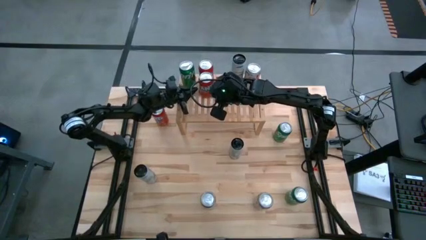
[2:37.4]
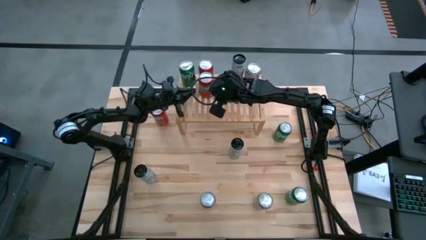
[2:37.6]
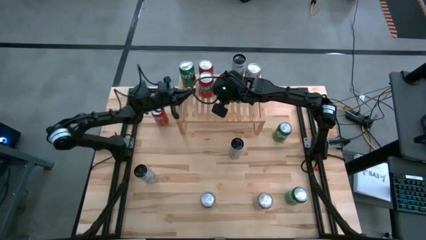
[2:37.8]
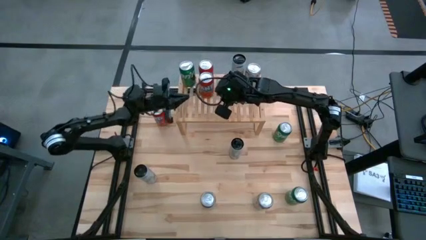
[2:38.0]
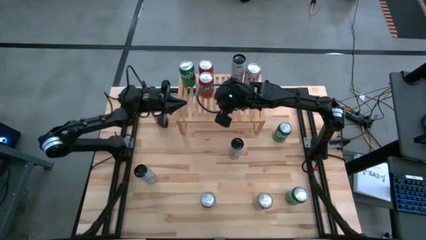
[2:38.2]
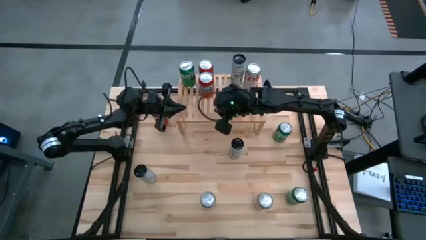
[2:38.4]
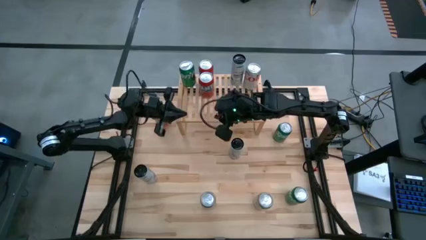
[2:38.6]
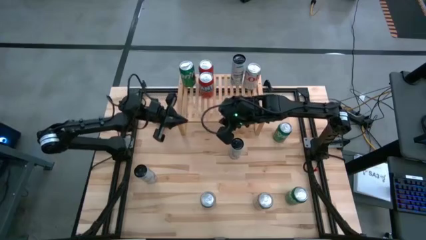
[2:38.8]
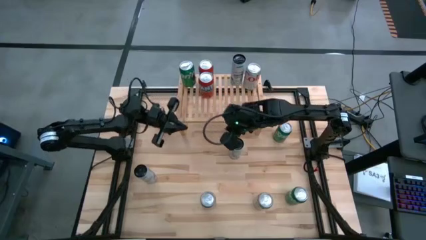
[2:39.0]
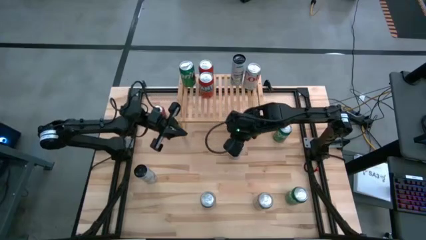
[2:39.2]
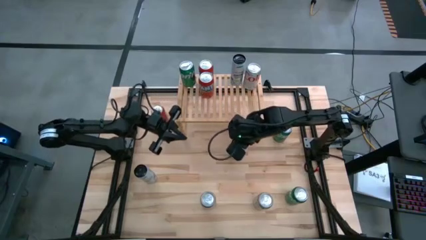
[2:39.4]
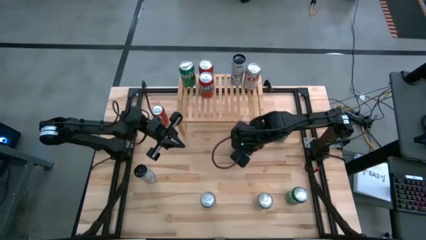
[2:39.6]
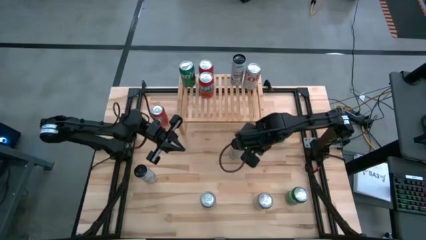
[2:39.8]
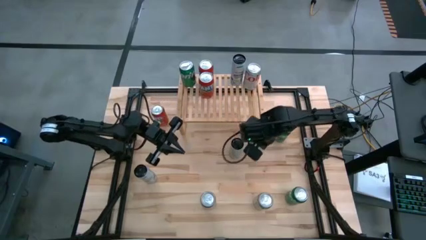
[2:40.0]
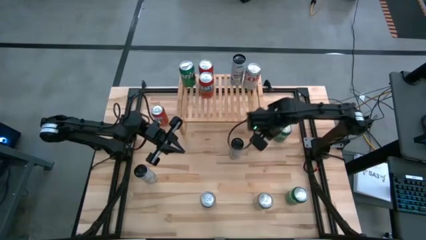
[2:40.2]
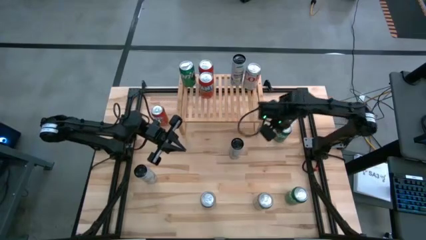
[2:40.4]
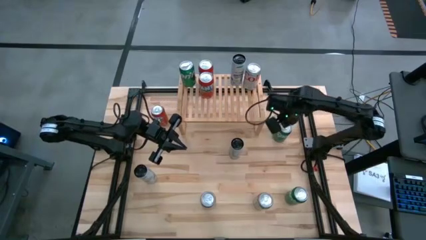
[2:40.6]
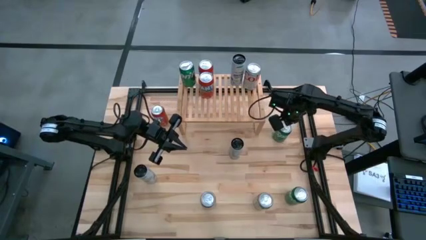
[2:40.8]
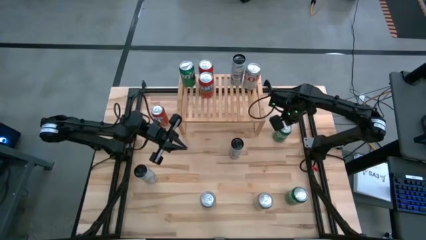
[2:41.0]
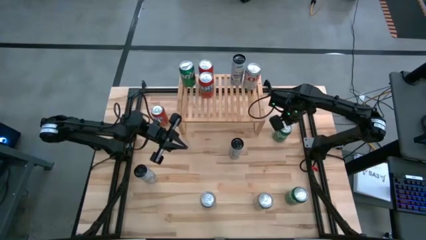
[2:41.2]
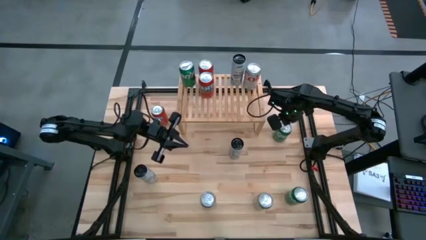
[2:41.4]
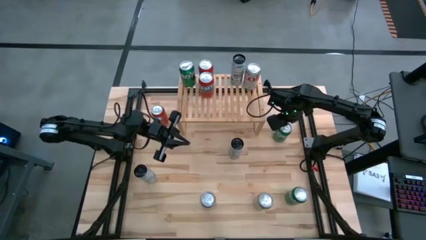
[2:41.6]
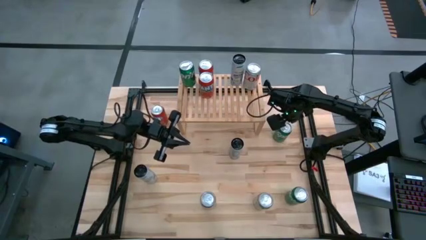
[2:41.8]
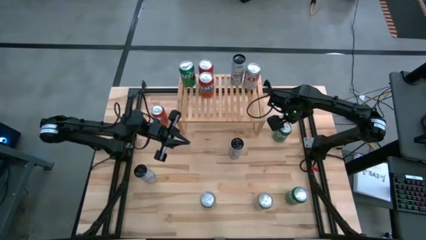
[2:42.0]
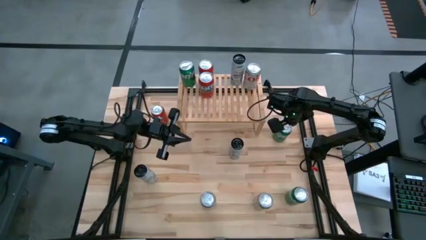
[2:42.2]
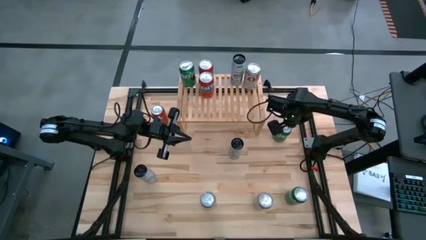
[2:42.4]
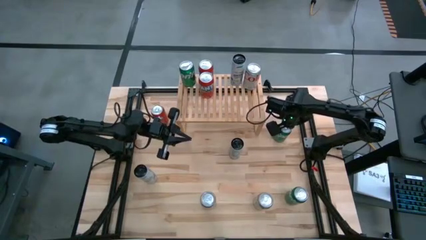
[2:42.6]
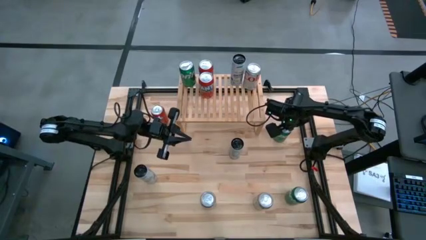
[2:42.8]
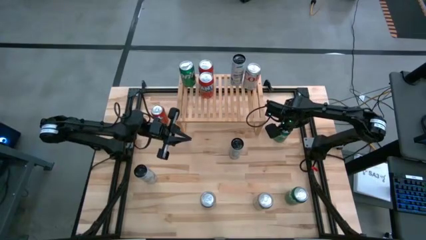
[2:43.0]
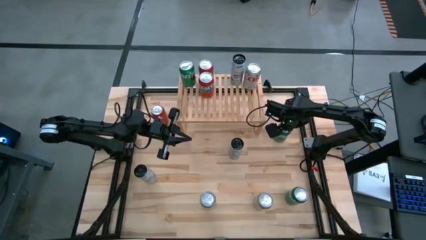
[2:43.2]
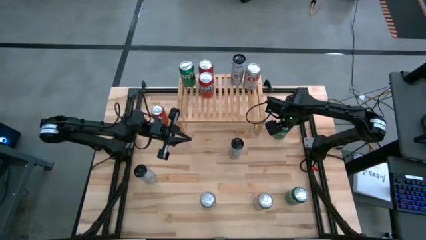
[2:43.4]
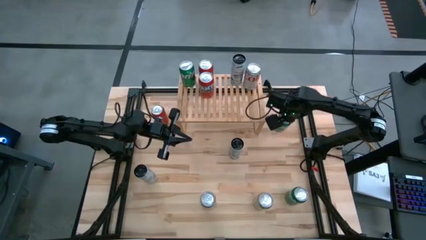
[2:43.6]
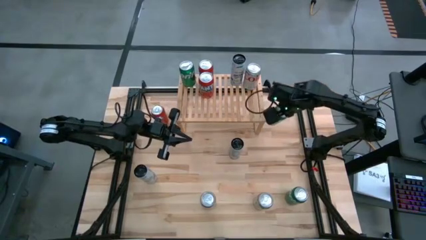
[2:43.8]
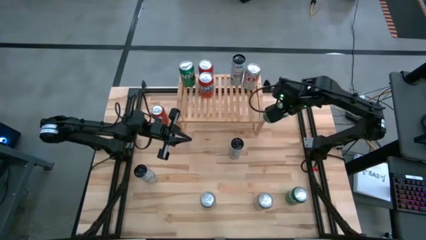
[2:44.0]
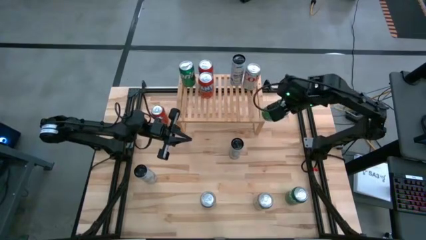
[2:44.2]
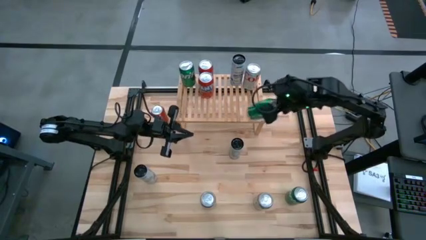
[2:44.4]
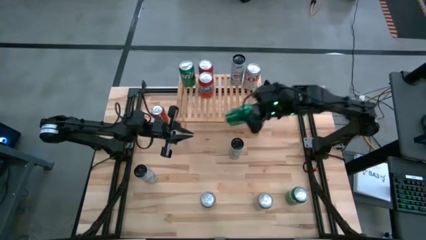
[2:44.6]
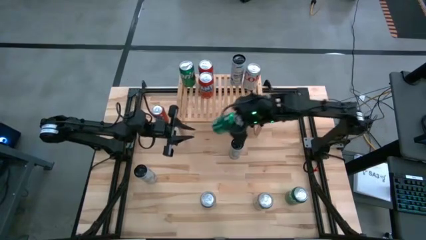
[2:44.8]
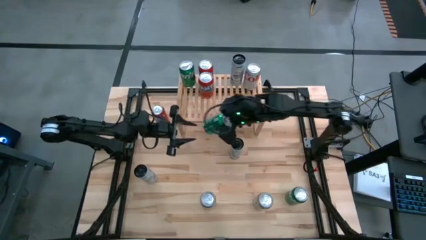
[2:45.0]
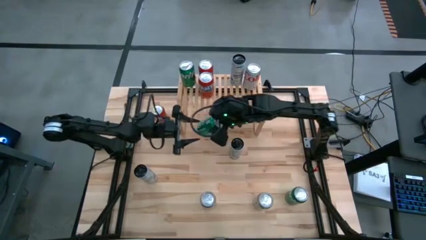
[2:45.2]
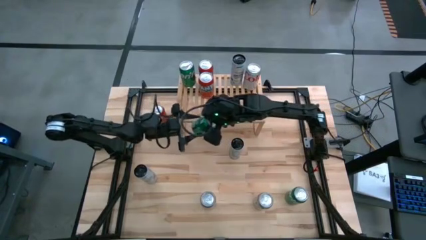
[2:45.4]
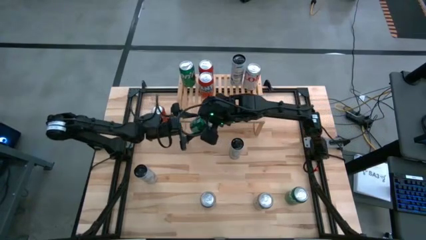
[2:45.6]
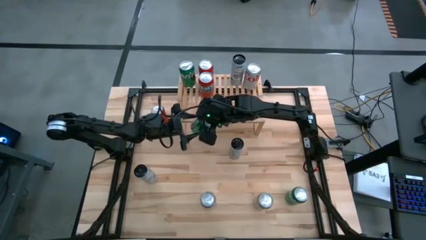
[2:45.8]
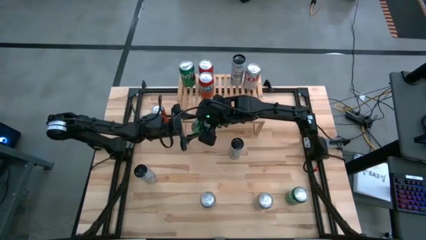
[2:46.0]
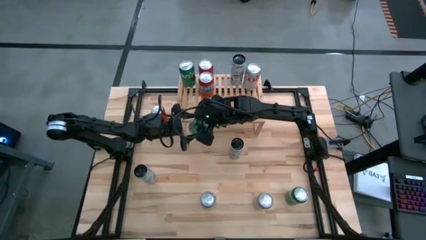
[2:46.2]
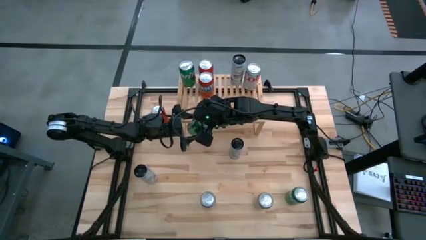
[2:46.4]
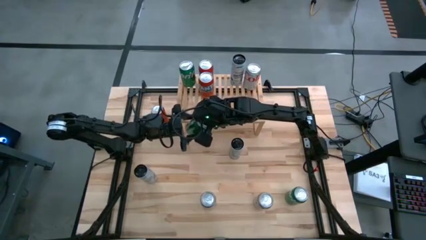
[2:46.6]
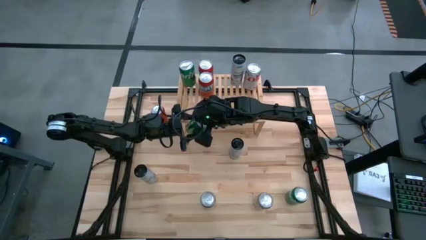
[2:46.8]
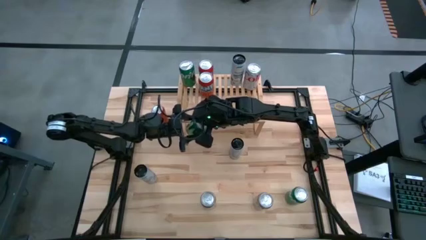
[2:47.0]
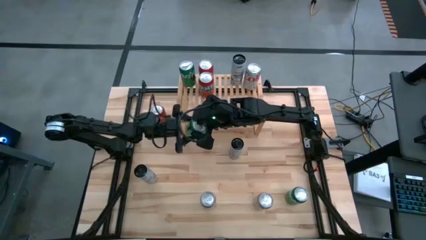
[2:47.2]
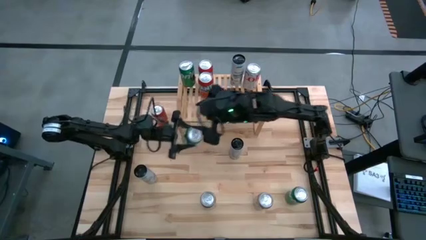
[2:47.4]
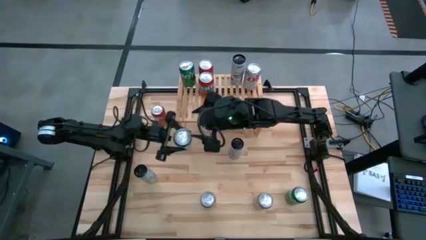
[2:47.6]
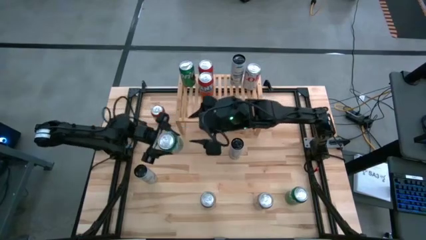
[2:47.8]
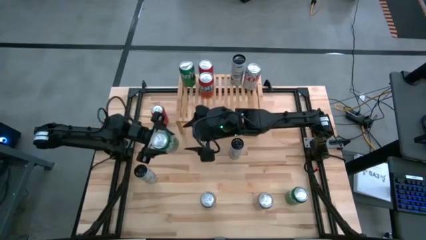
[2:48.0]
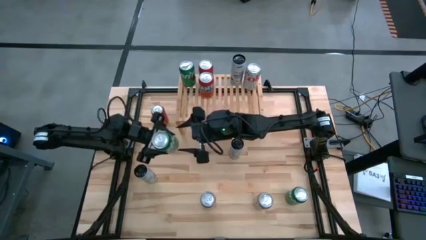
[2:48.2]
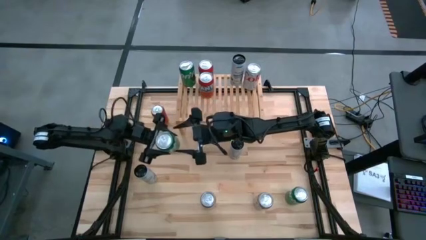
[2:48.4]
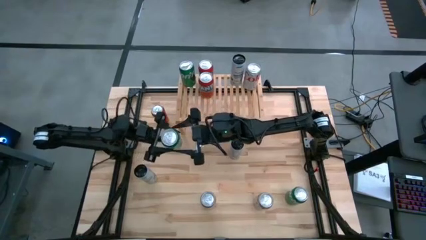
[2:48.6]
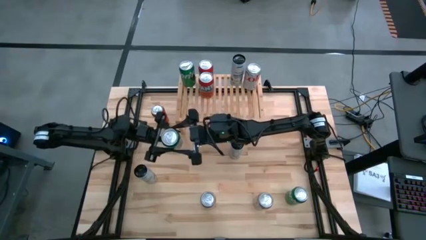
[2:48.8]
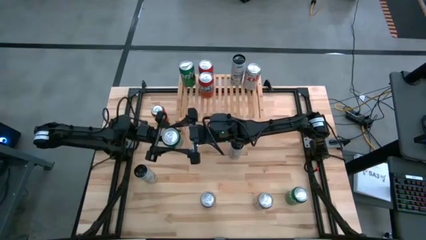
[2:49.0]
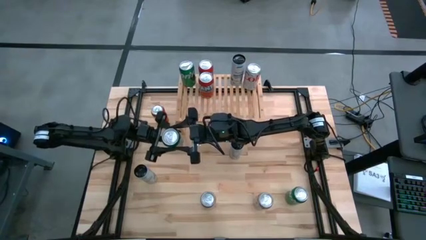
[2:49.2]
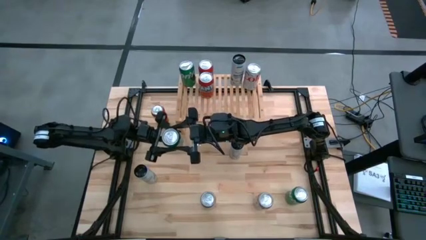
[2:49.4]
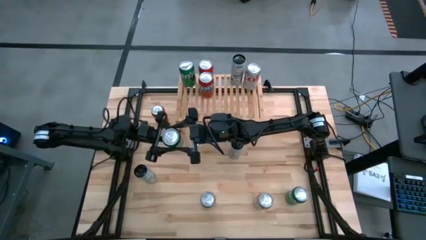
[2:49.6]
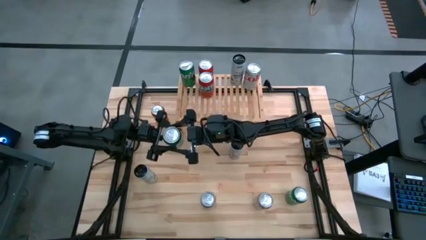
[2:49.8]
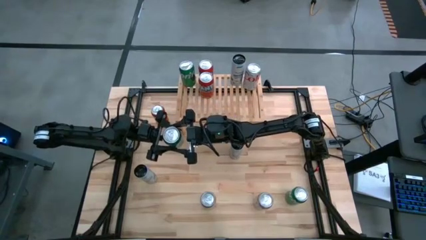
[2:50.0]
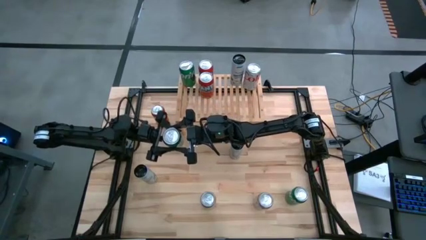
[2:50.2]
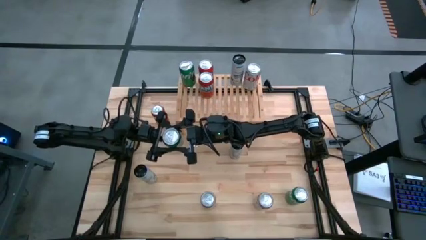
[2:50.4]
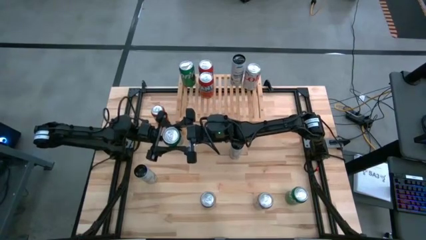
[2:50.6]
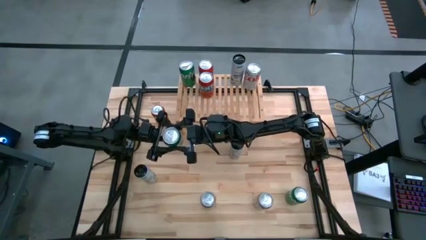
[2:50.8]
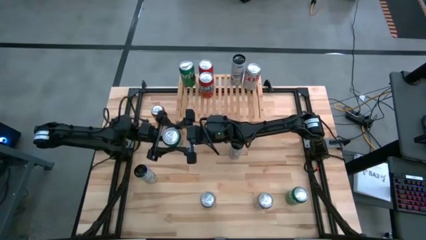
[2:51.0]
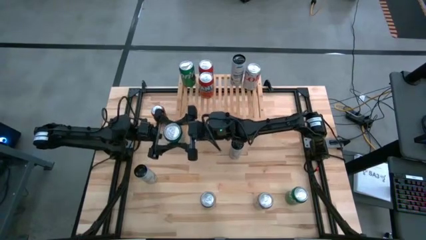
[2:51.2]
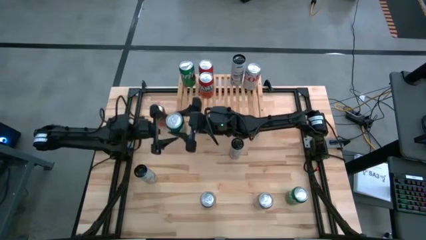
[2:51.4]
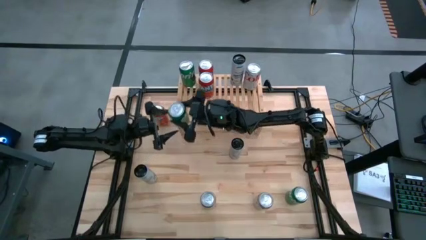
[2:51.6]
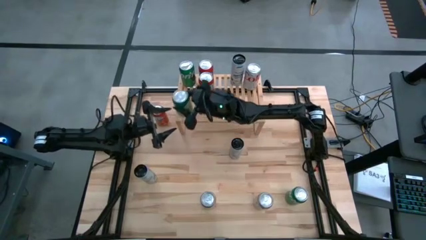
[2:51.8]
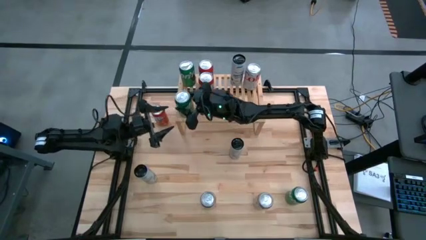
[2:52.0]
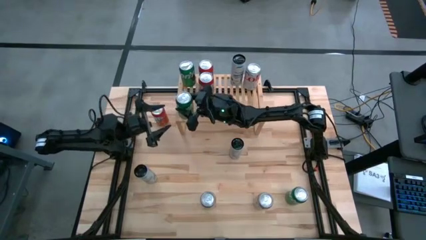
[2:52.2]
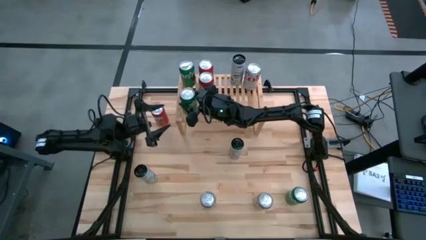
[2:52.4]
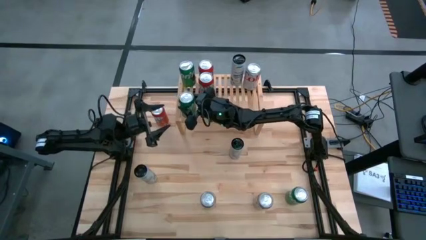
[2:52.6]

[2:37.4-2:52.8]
Task: Place canned beverage on shelf
Put the top green soda can aligned with the other red soda can on the shelf
